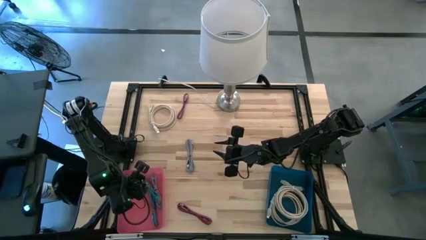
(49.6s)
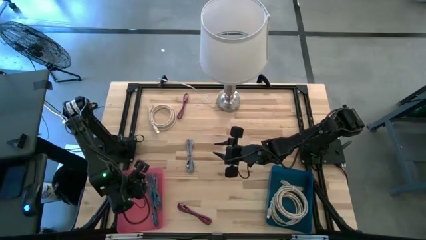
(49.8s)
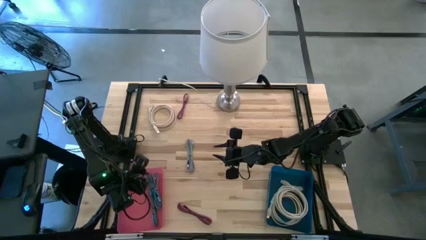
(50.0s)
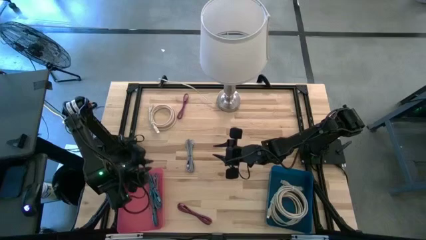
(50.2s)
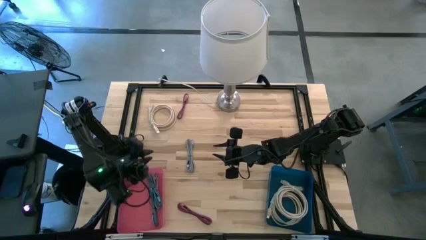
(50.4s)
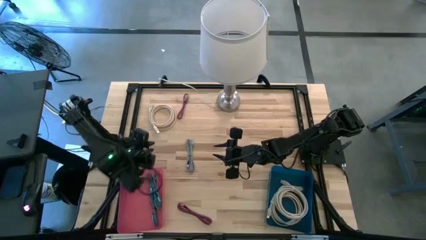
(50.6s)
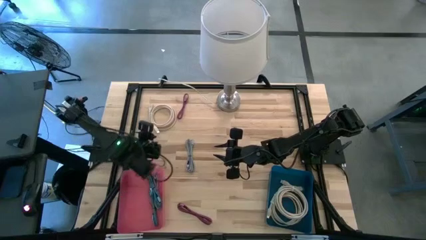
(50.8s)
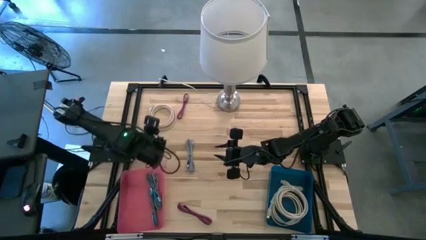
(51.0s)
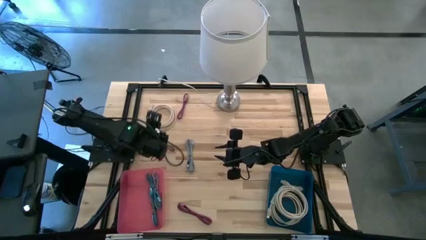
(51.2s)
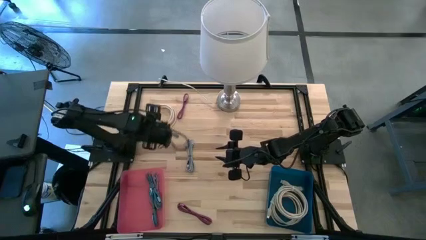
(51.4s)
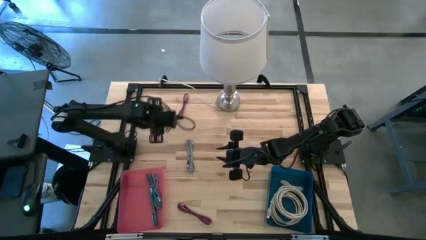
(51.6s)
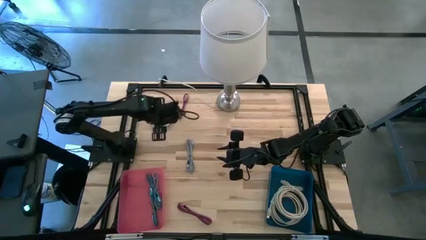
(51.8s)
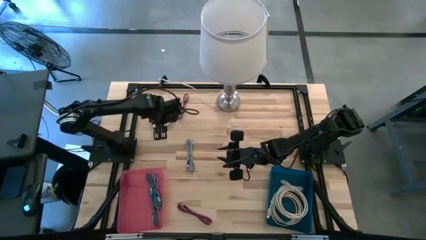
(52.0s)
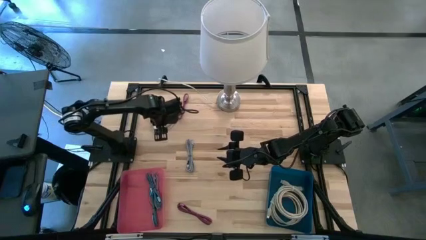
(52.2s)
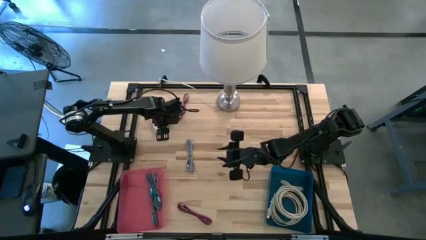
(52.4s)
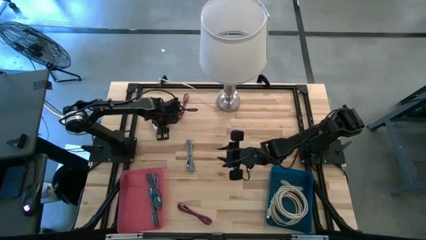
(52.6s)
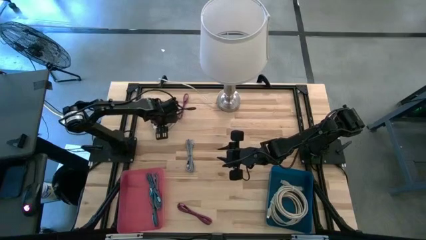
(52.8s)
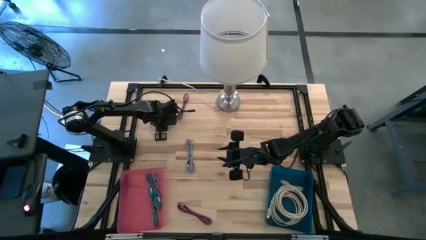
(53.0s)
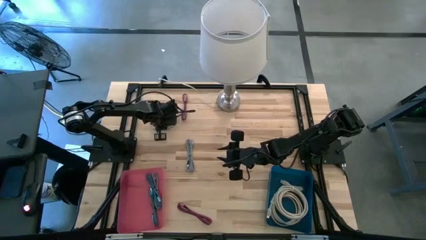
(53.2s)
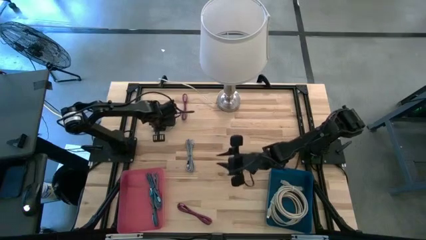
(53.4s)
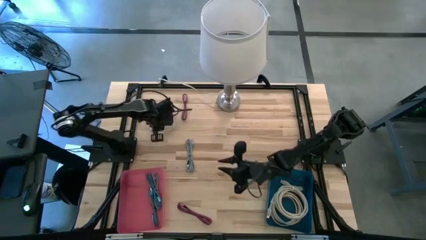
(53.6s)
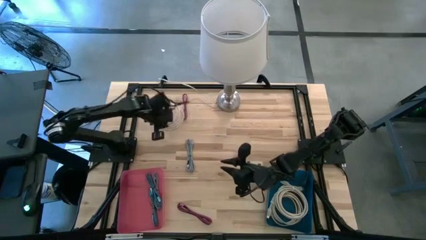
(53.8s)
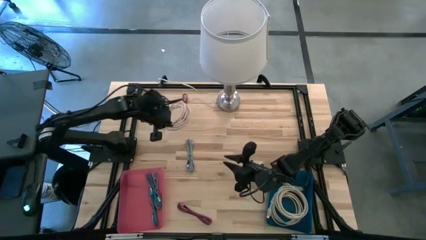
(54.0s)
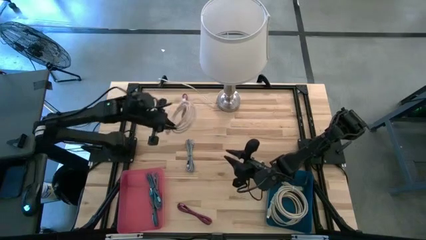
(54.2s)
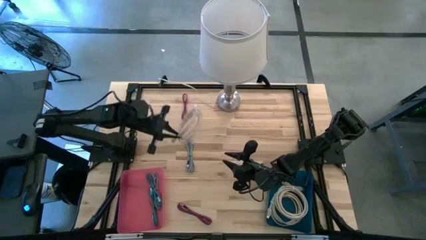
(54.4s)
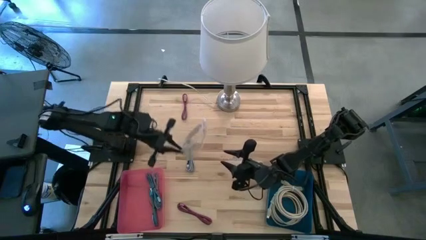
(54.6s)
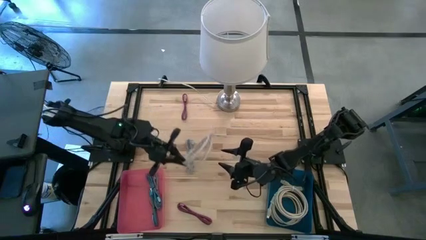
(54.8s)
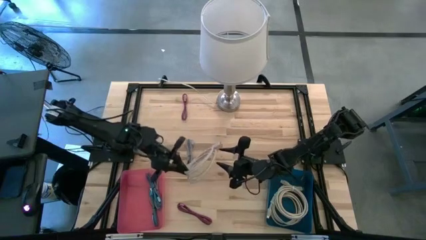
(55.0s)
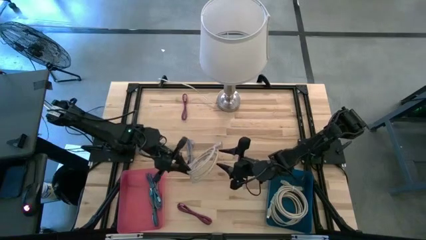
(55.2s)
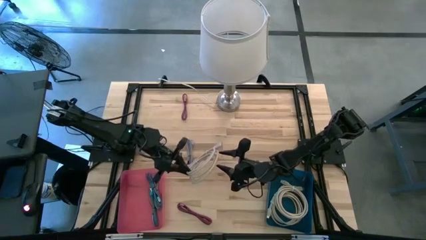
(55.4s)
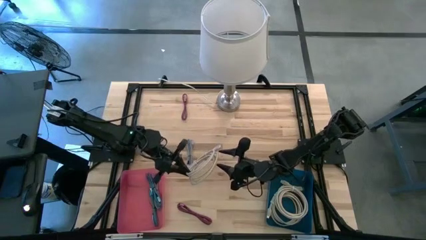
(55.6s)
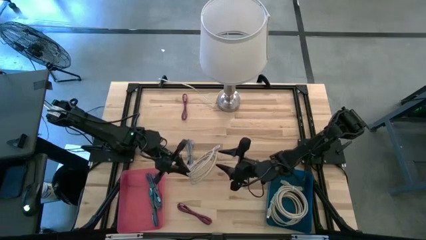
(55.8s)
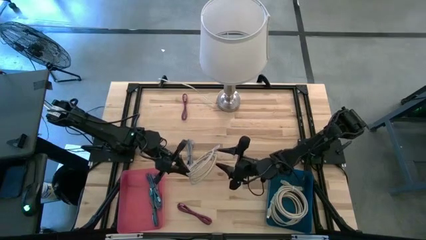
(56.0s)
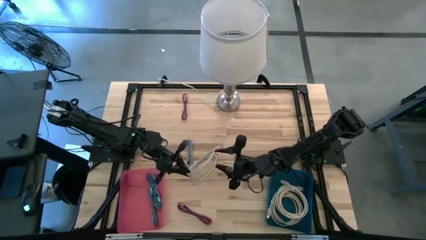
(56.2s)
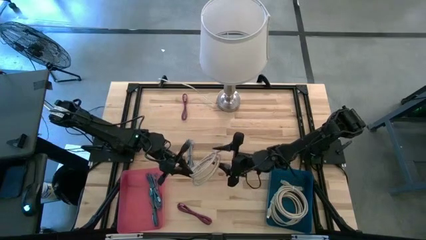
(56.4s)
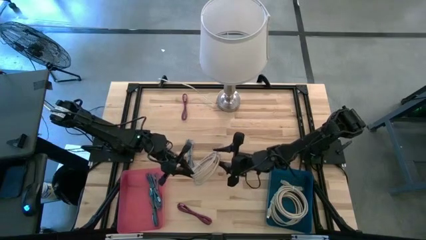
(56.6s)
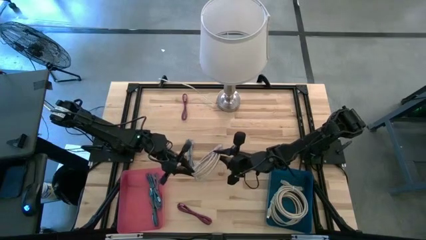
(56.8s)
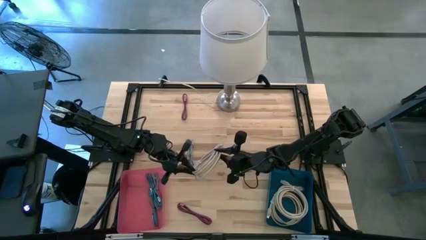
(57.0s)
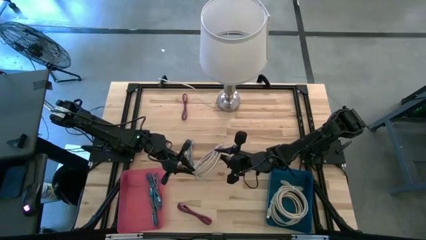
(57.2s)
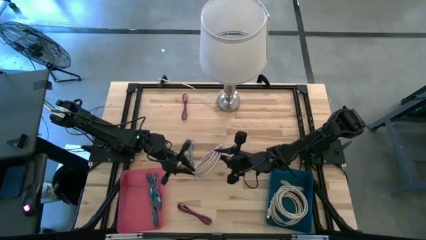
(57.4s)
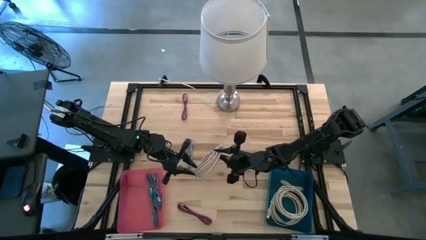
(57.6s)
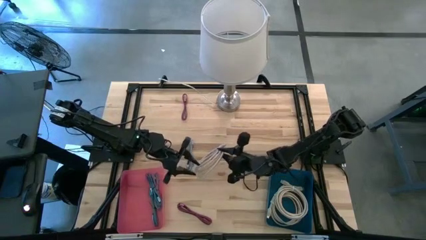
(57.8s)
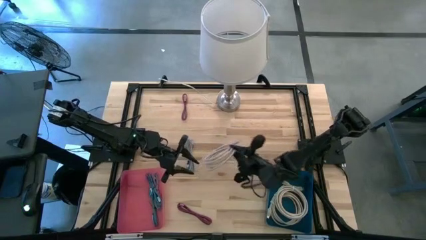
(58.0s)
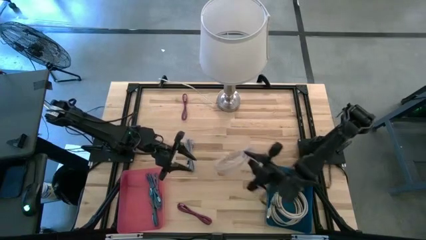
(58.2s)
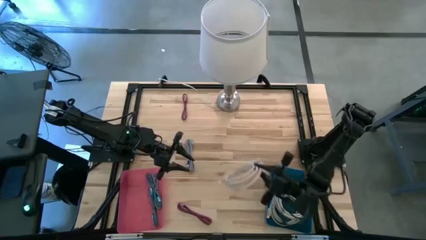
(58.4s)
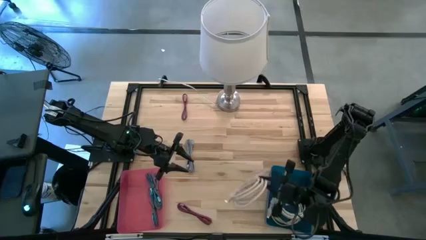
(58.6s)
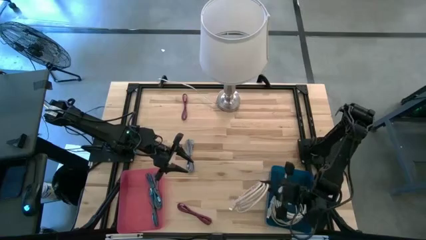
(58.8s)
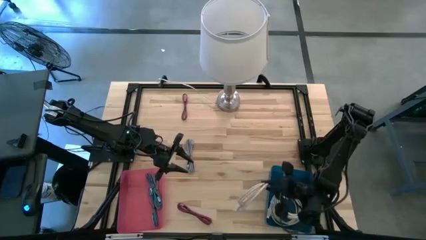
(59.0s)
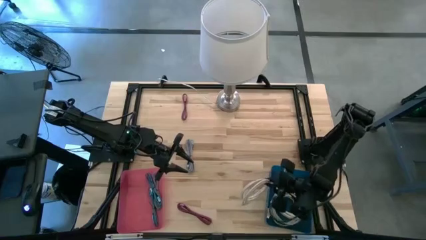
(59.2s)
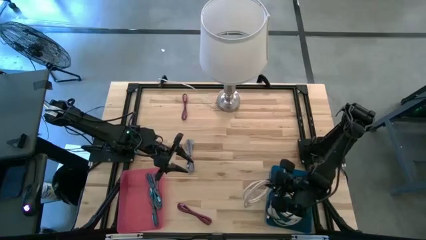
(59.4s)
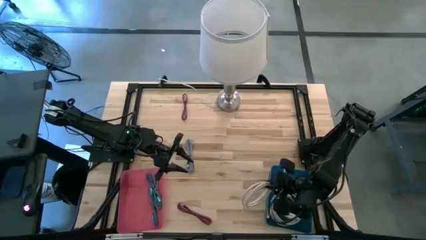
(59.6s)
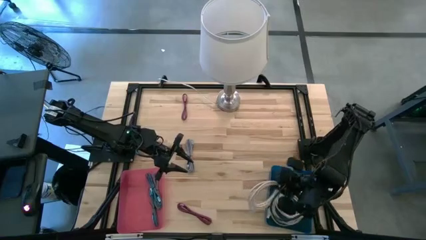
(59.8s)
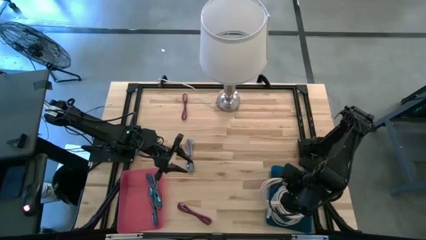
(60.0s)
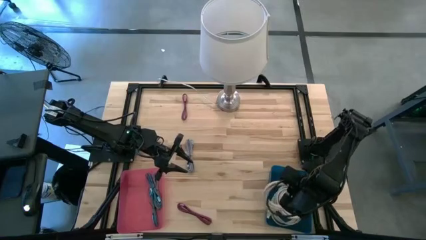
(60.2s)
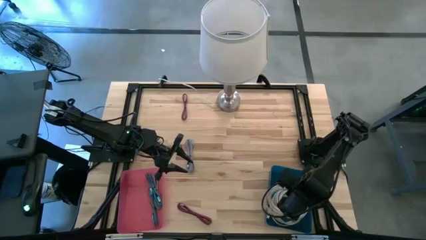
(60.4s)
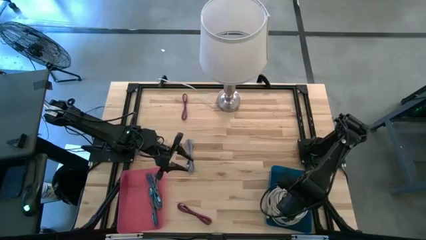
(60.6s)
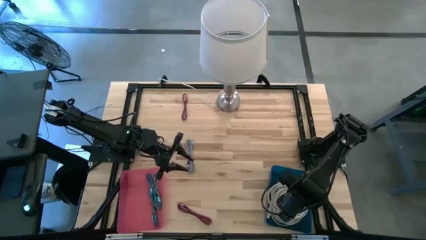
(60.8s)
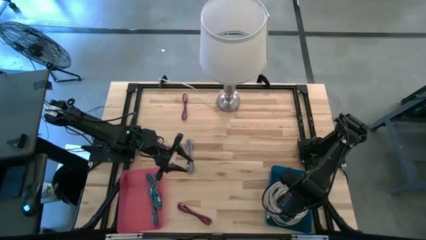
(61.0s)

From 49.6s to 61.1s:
Task: Pick & Place USB Port
Put the light brown USB cable into the blue bin

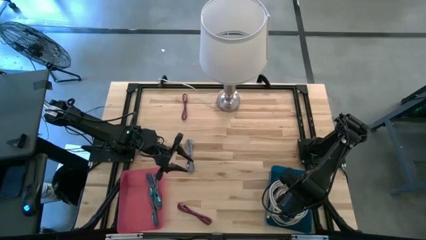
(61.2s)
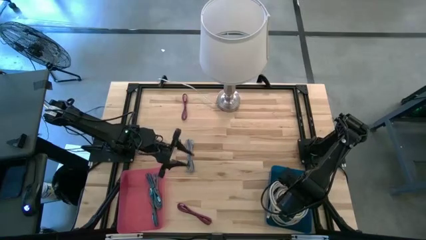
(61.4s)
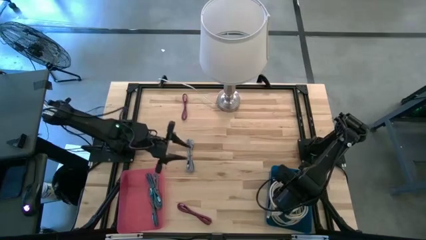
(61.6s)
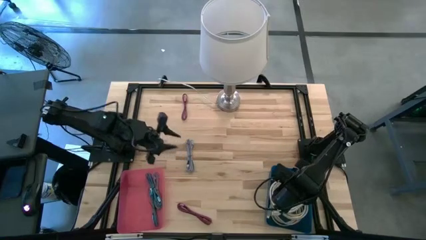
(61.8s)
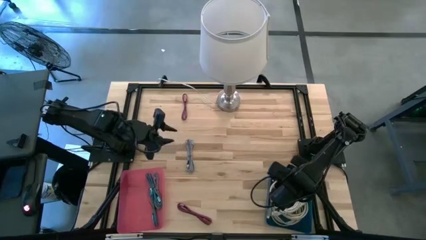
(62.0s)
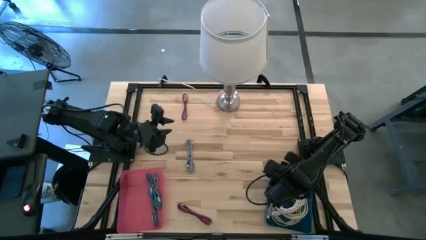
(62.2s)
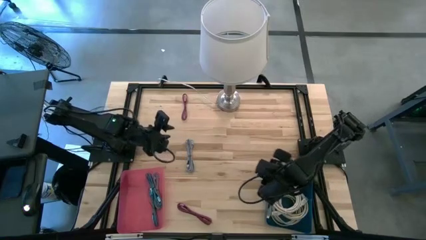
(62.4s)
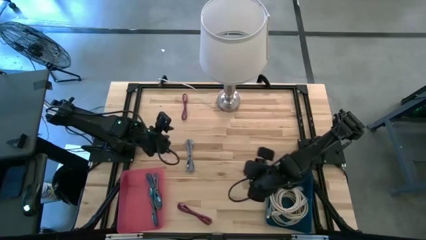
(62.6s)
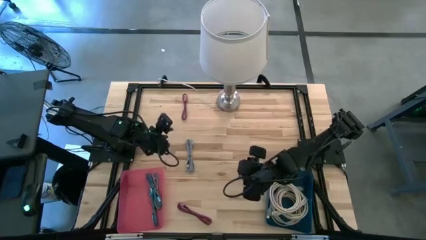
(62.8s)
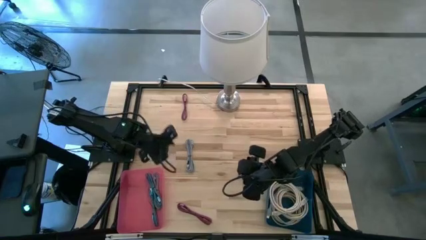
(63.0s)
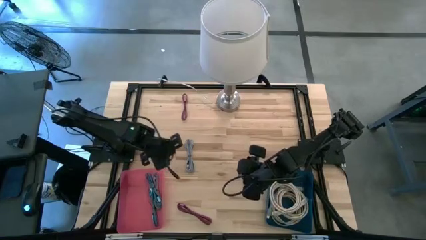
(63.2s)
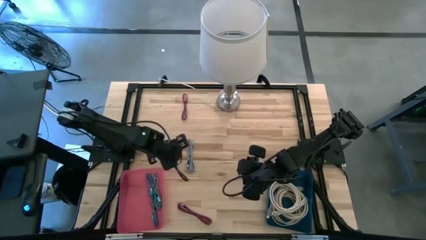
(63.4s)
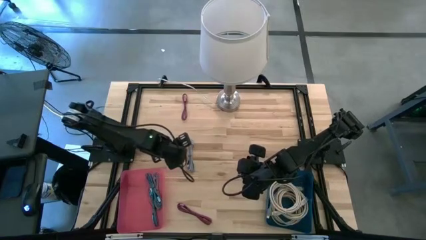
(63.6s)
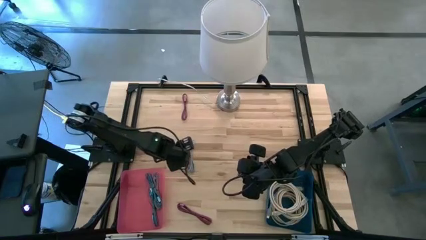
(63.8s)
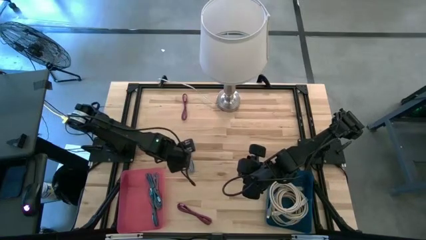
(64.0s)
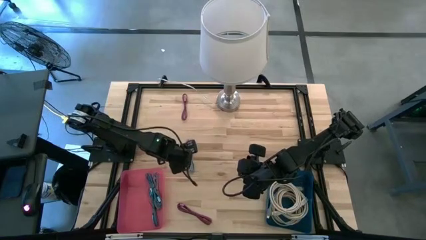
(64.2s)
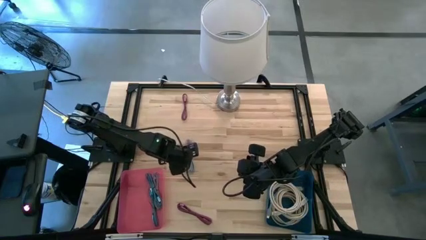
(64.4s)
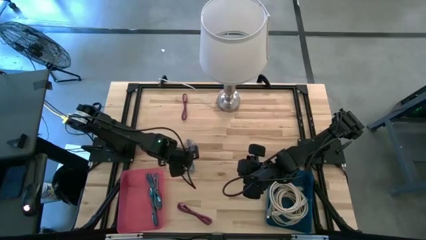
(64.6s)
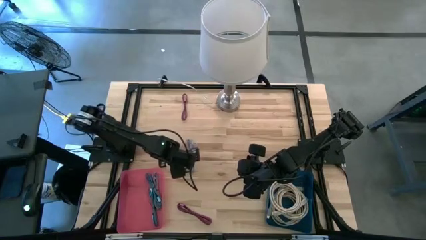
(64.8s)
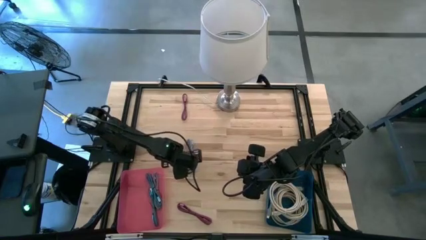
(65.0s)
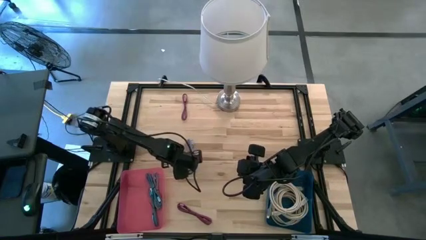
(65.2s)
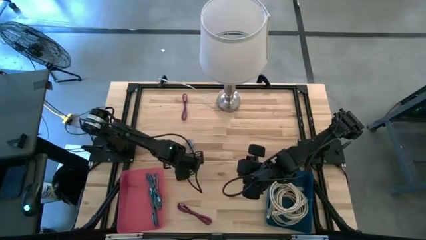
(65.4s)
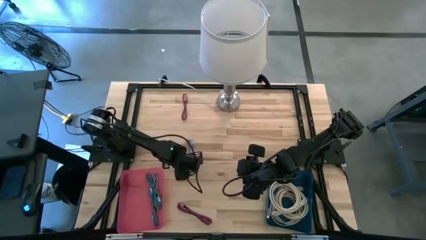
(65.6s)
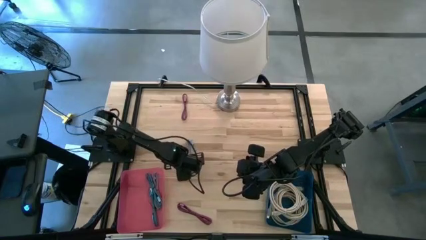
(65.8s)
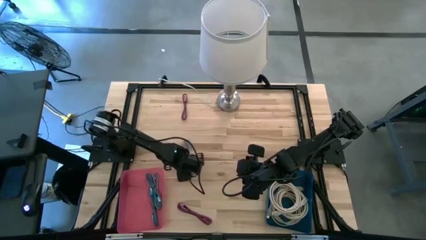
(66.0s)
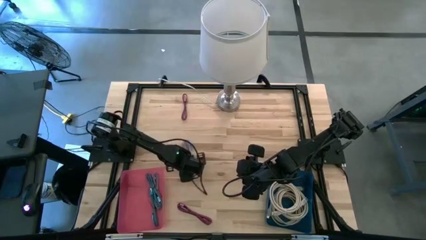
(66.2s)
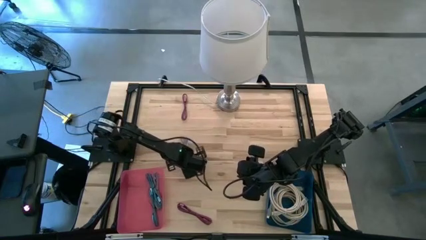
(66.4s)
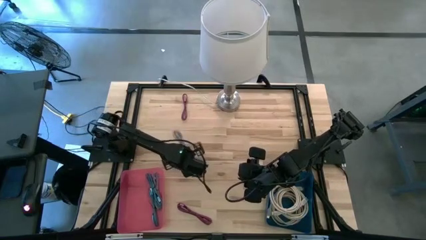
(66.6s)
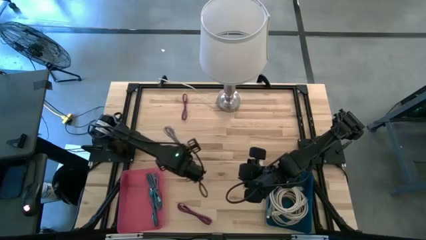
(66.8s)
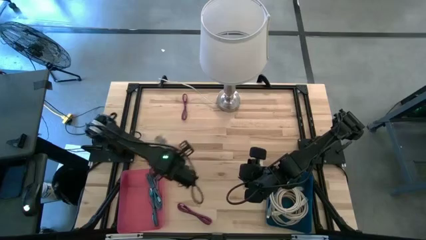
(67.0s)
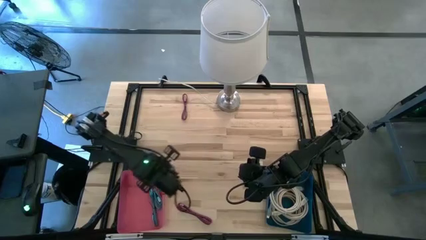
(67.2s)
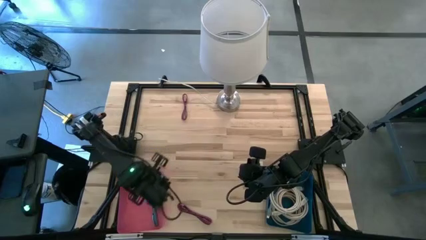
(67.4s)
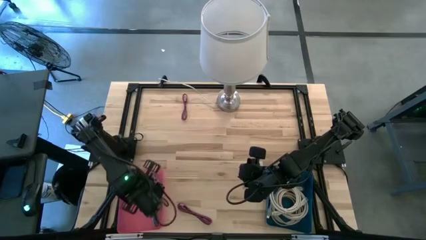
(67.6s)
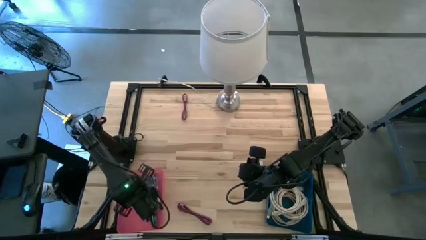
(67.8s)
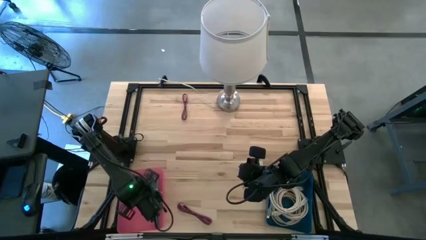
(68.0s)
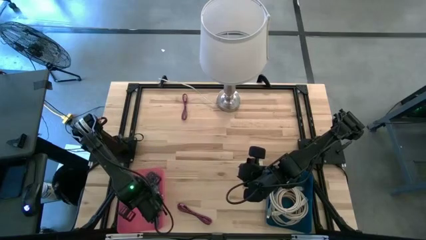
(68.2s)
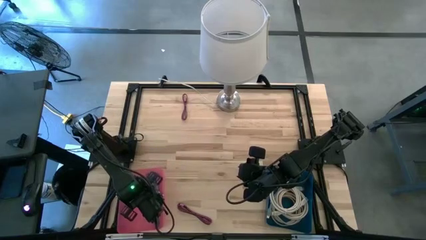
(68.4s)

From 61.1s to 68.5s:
Put the white and black USB cable into the pink bin
